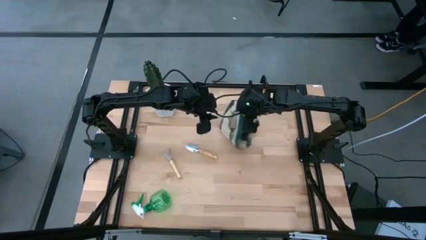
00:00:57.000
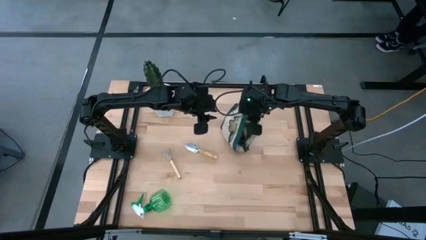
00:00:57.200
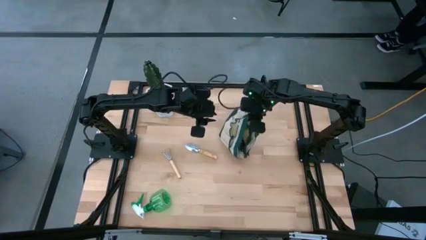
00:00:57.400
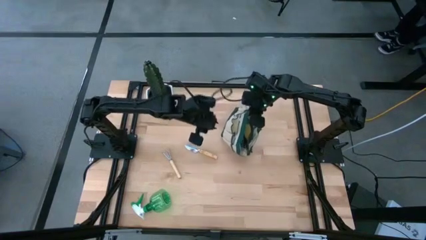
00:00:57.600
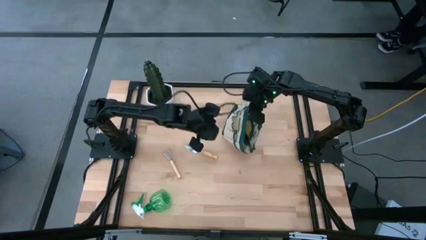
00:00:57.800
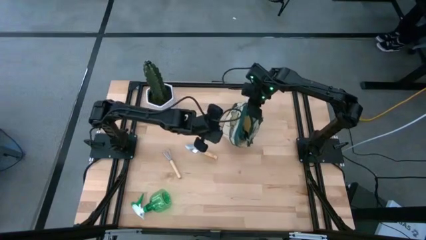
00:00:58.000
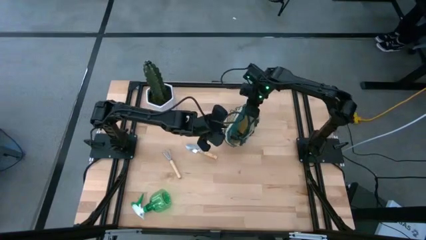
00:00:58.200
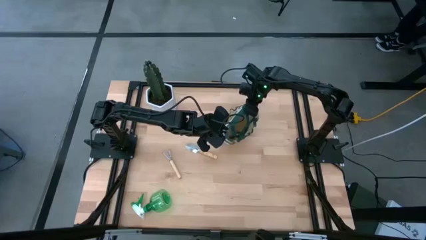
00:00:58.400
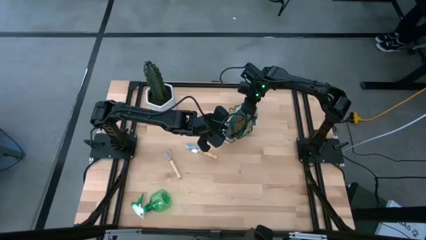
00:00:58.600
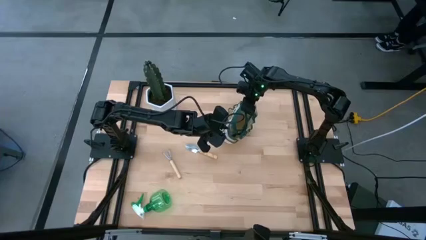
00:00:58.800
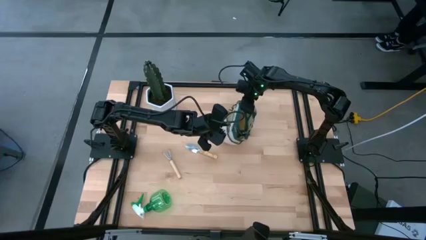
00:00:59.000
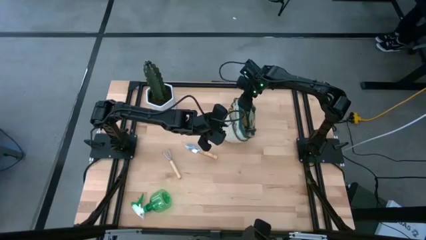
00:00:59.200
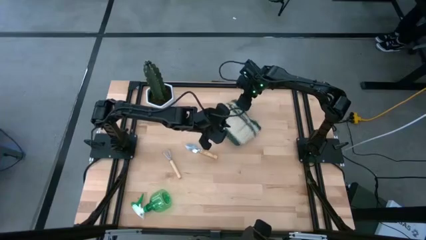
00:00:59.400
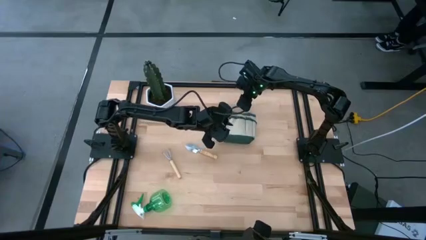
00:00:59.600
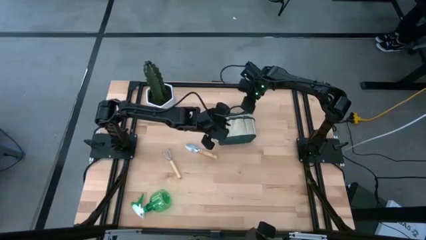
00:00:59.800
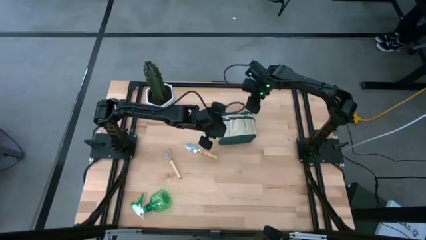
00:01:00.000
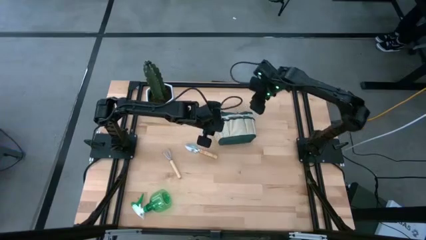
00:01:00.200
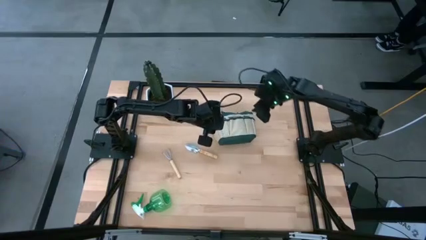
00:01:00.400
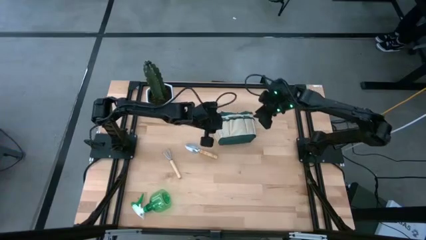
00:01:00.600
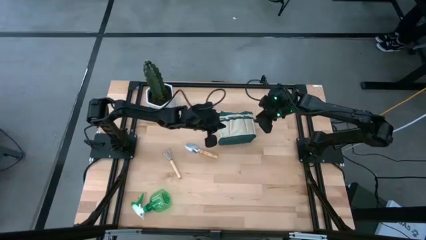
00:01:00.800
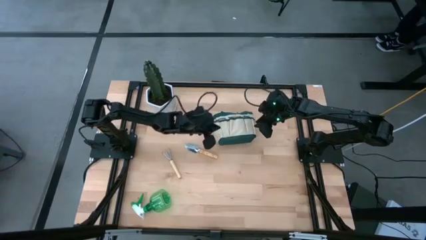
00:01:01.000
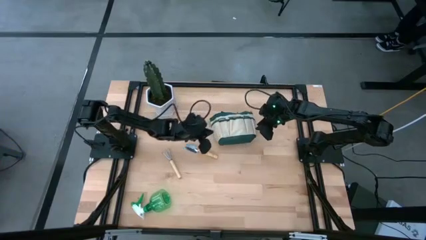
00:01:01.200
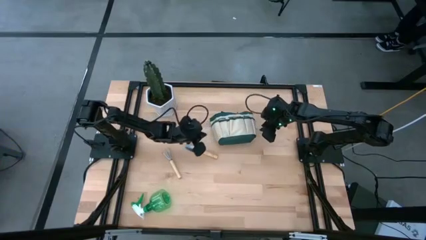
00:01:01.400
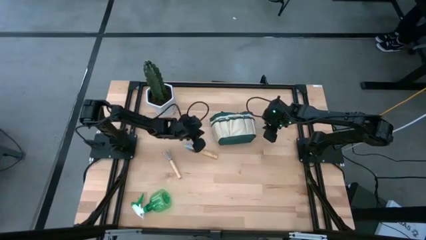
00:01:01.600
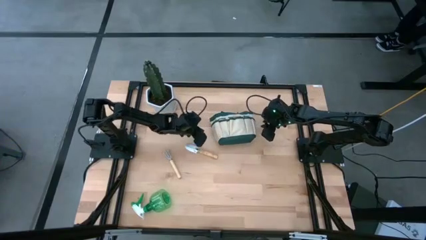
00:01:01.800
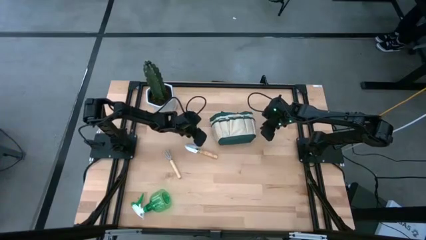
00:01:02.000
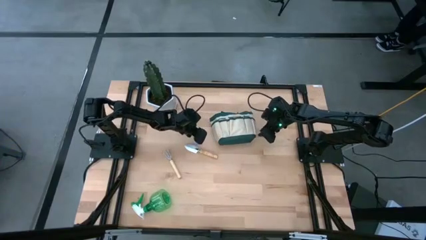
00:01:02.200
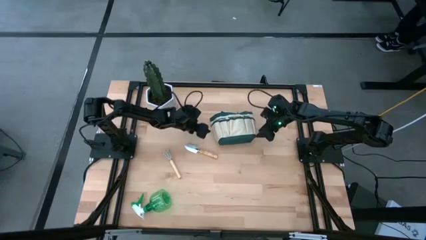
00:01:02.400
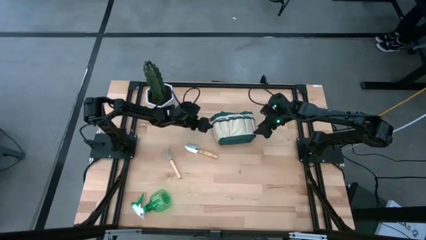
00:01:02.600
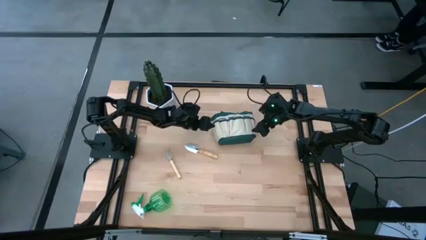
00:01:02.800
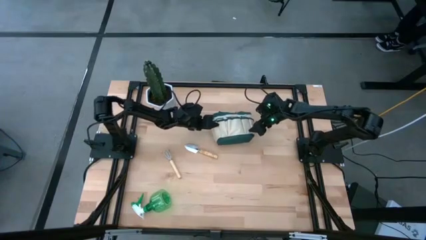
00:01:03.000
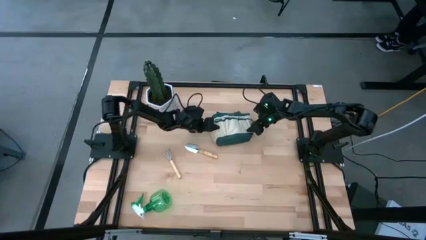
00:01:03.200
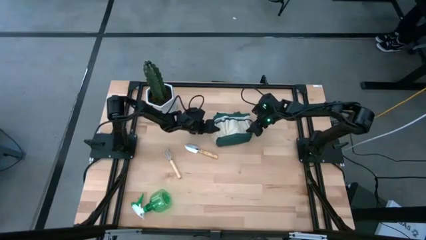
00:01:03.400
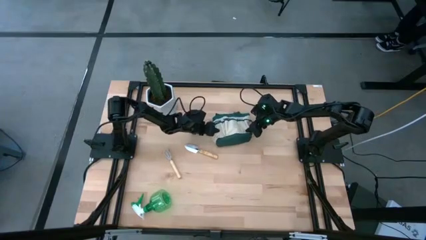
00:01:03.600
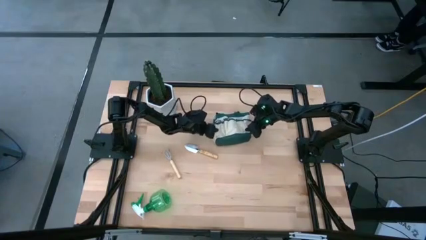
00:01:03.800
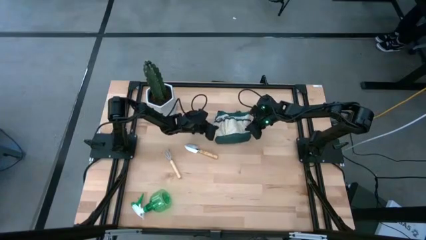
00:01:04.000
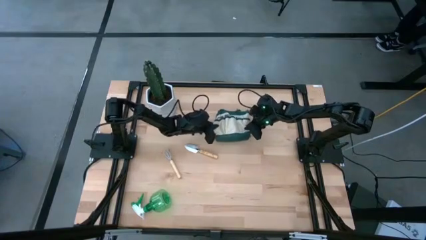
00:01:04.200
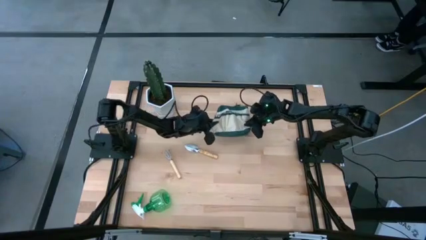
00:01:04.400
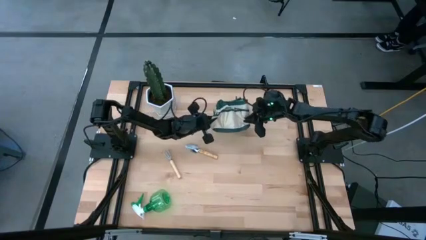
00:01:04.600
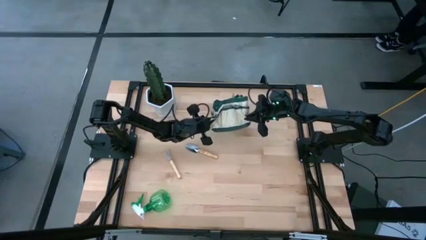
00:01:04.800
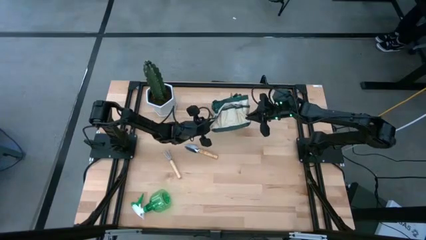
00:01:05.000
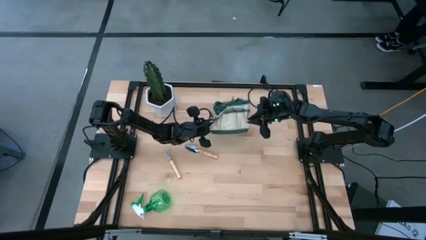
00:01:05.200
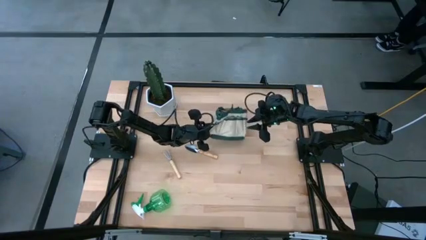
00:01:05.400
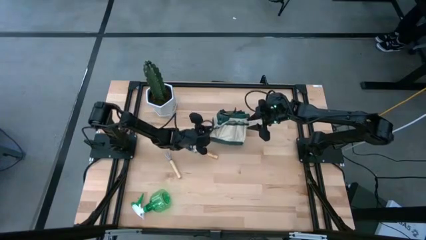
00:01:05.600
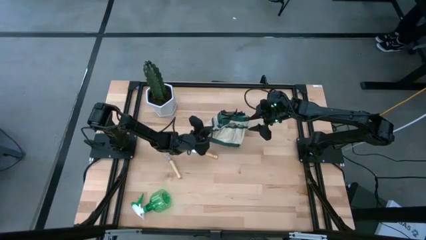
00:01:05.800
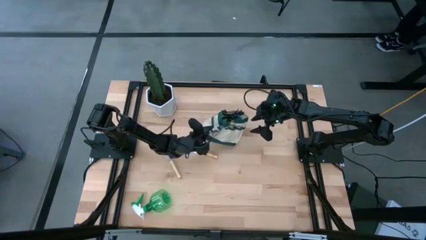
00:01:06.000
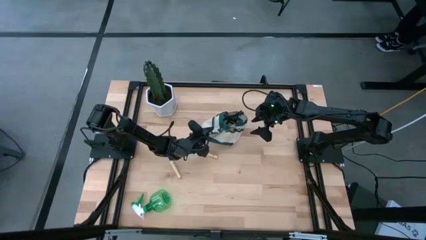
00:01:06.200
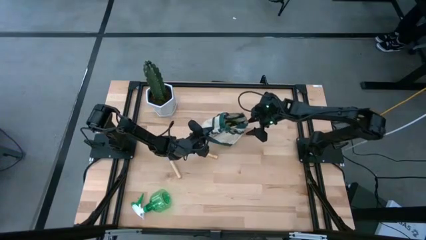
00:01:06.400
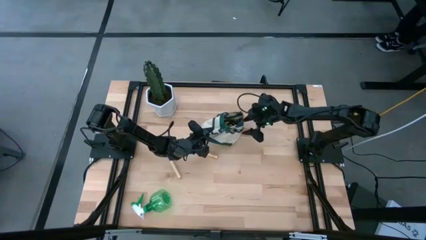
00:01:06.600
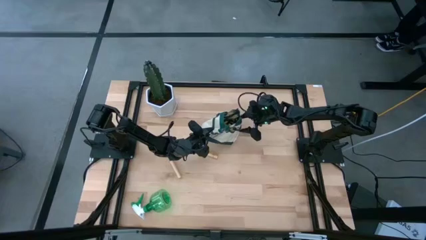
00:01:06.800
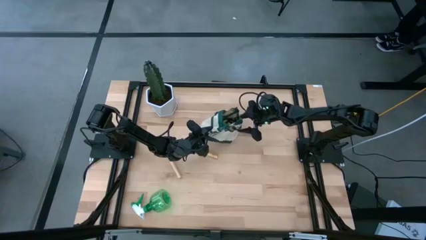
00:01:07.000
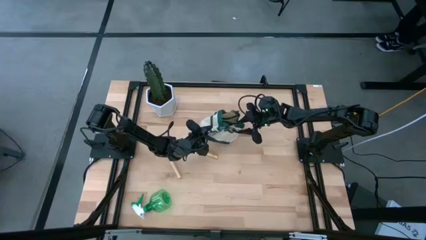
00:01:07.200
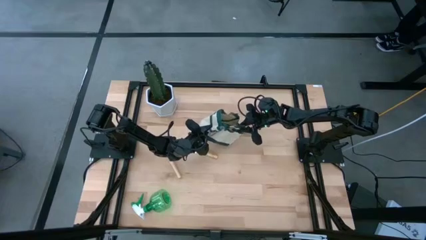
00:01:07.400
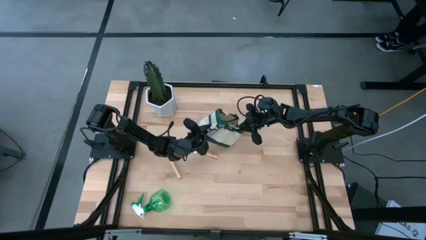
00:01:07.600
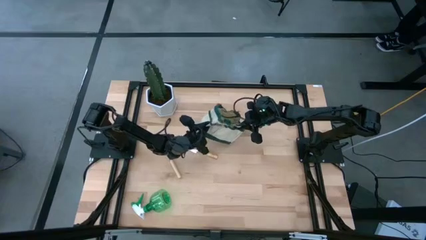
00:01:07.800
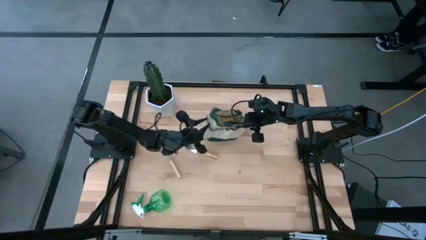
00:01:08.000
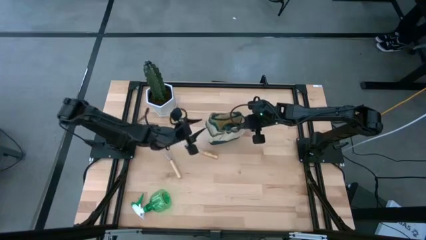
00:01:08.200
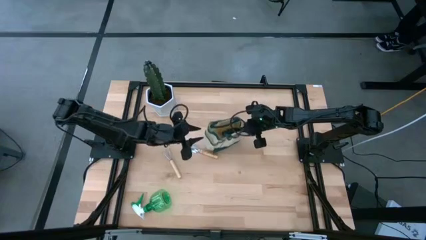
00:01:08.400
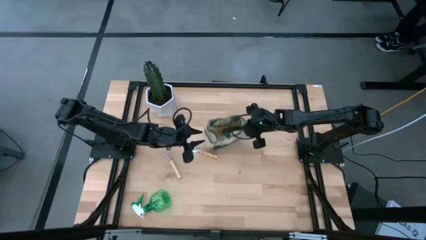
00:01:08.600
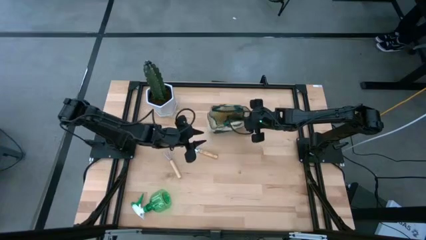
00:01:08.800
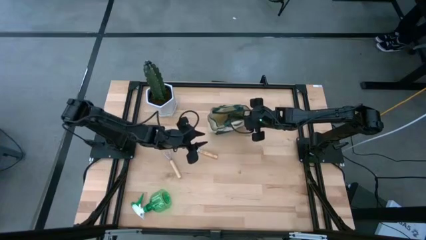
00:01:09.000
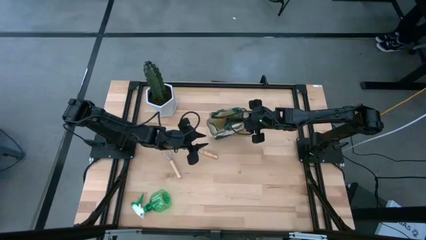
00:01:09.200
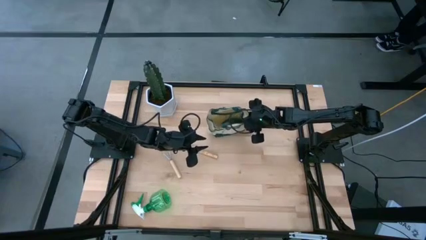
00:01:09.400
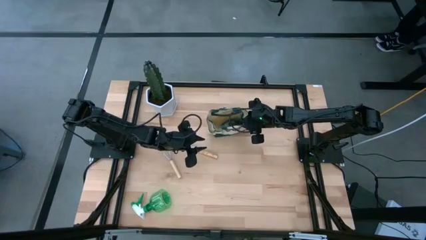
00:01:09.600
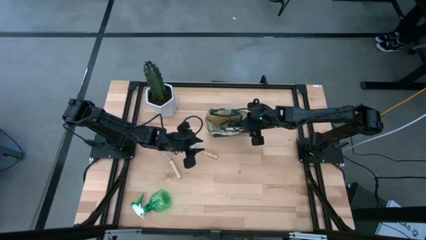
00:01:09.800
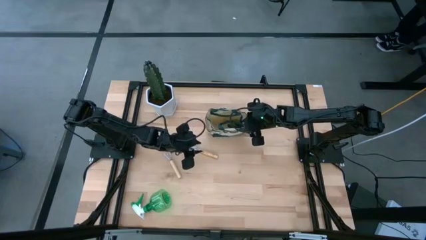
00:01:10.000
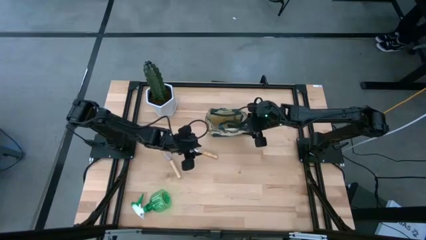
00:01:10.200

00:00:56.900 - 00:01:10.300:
Task: Pick & Place Garden tools in Gardening bag
Adjust the gardening bag

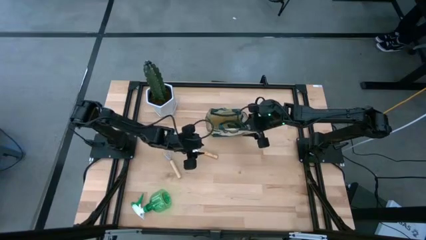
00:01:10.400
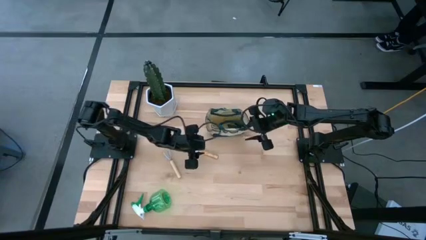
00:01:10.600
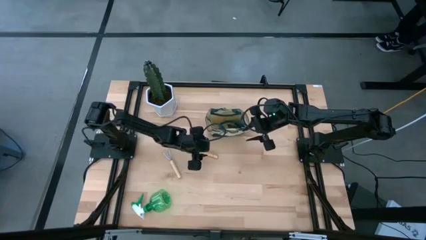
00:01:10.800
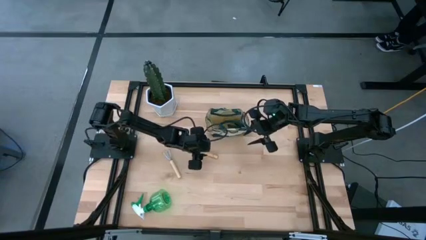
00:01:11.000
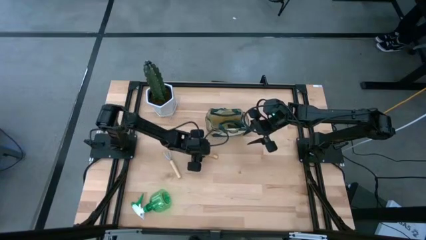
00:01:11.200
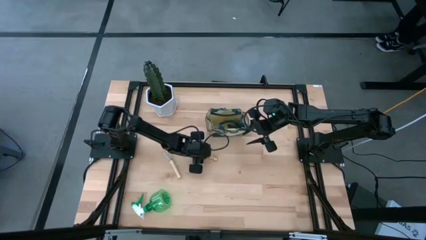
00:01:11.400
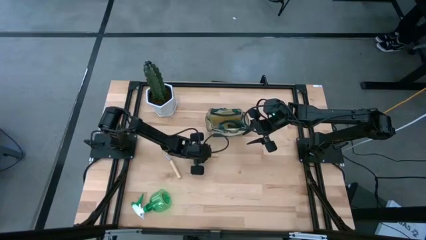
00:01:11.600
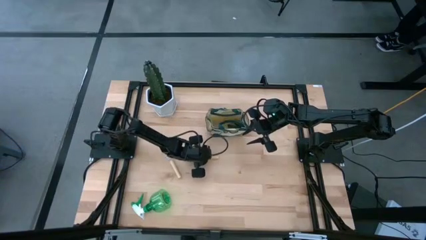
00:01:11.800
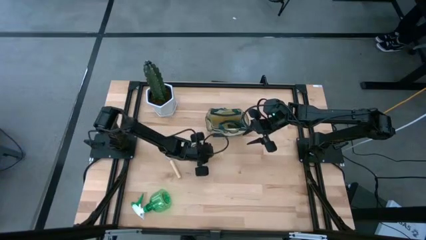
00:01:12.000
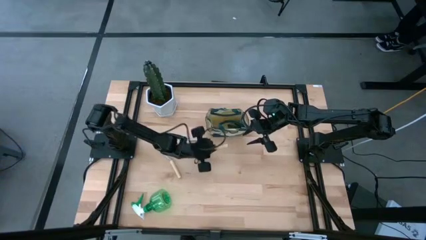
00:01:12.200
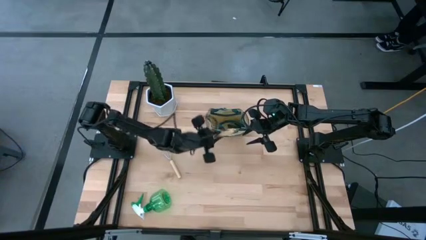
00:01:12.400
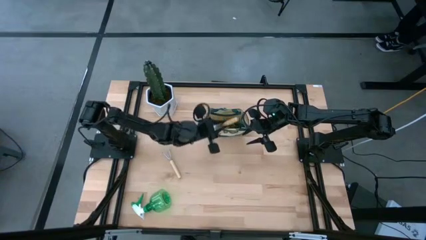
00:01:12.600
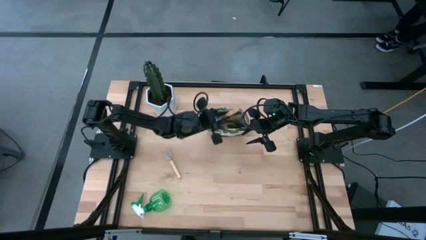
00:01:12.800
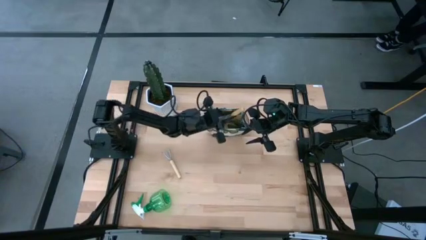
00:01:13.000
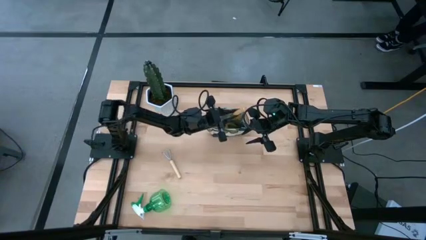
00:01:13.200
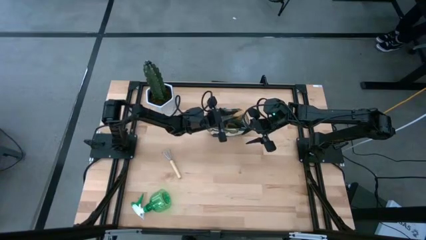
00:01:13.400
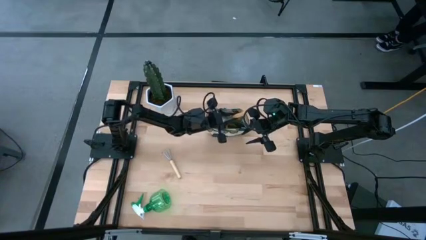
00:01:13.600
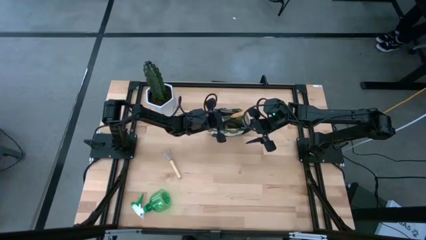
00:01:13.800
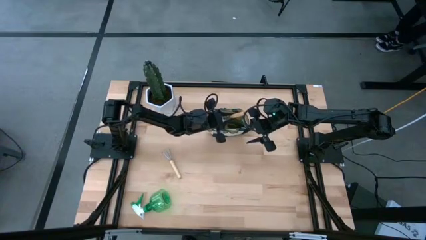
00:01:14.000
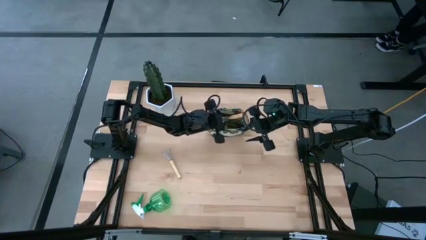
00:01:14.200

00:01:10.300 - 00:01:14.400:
Put the trowel into the gardening bag
